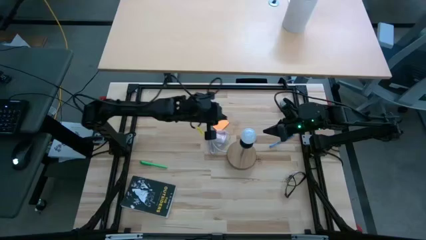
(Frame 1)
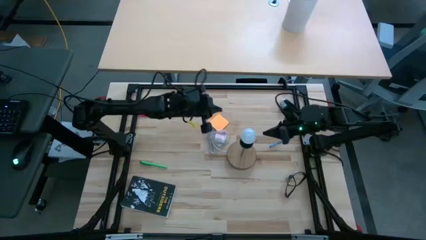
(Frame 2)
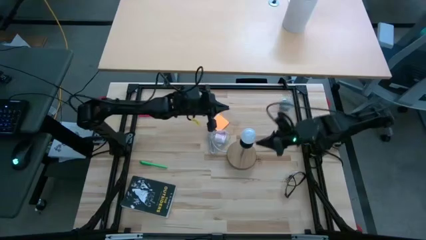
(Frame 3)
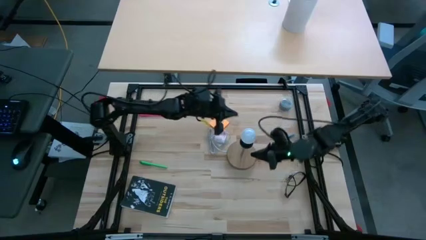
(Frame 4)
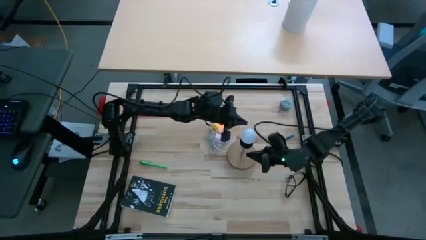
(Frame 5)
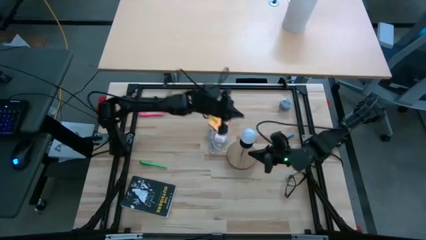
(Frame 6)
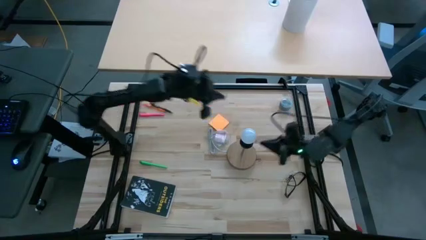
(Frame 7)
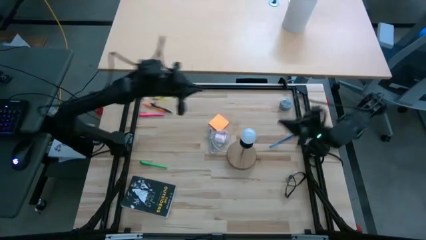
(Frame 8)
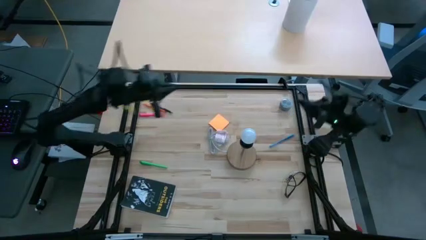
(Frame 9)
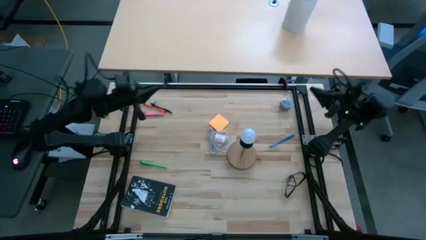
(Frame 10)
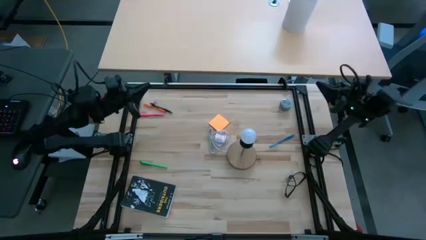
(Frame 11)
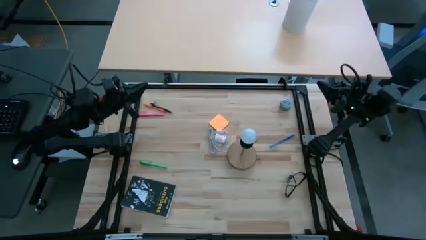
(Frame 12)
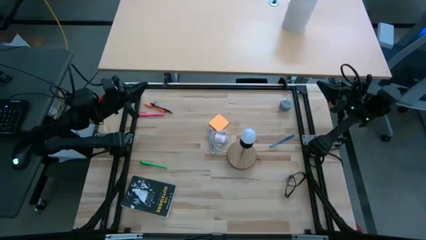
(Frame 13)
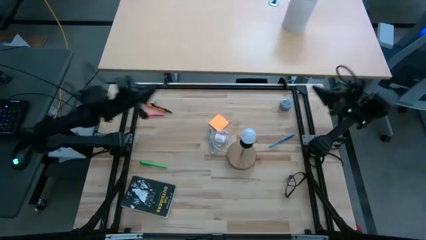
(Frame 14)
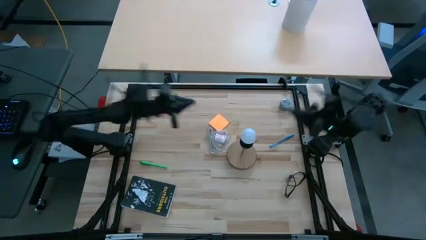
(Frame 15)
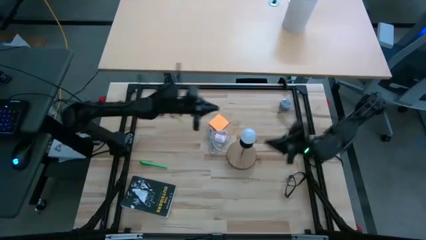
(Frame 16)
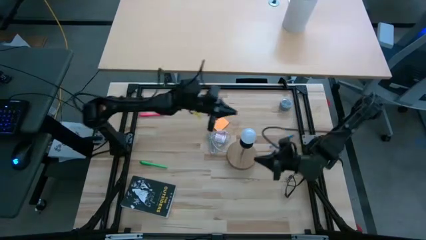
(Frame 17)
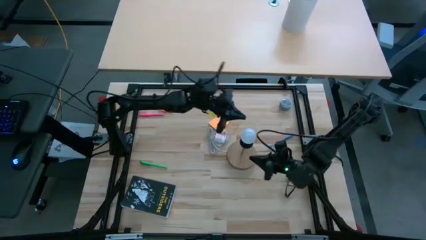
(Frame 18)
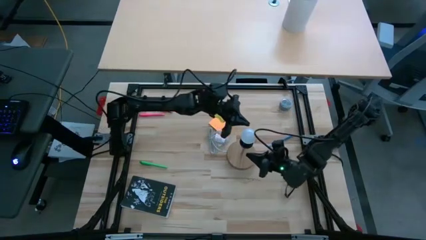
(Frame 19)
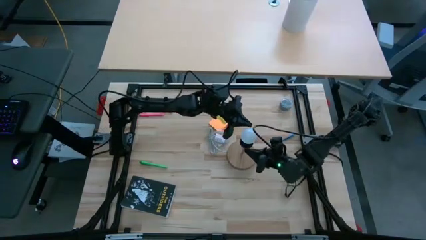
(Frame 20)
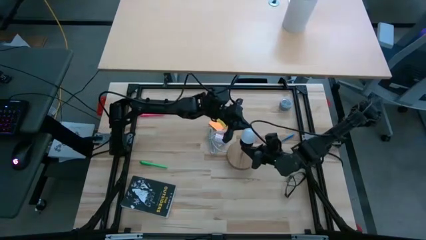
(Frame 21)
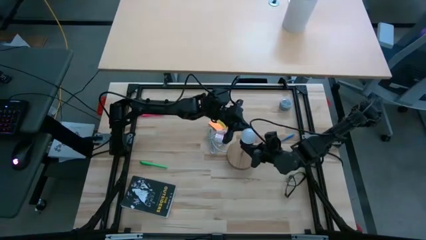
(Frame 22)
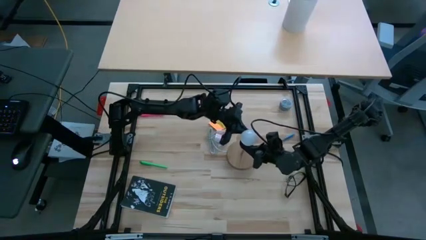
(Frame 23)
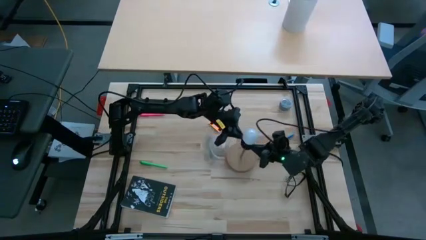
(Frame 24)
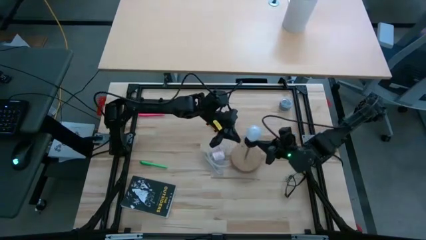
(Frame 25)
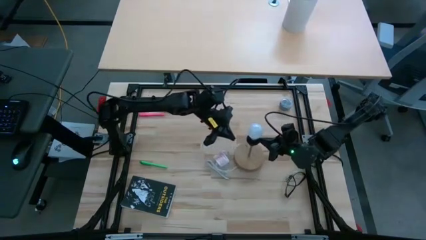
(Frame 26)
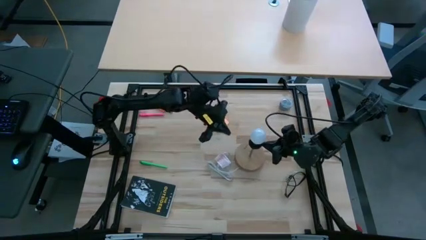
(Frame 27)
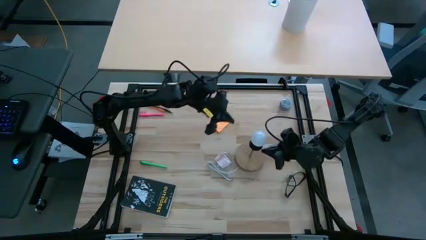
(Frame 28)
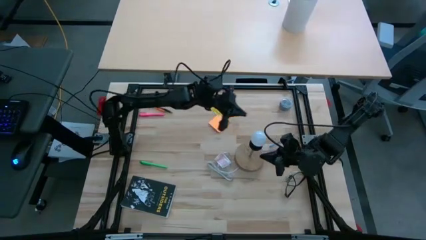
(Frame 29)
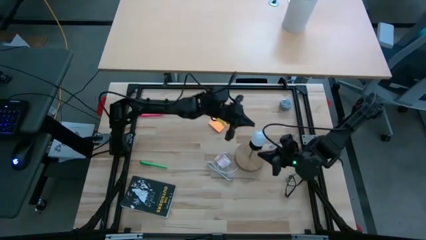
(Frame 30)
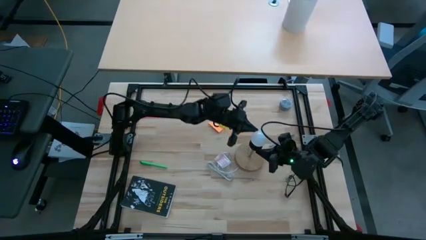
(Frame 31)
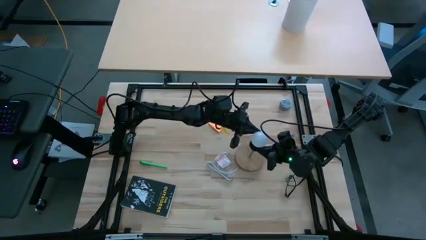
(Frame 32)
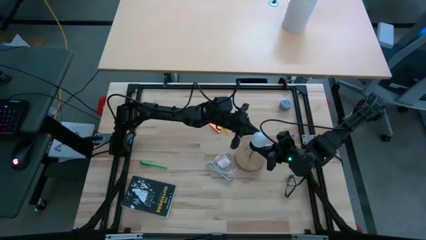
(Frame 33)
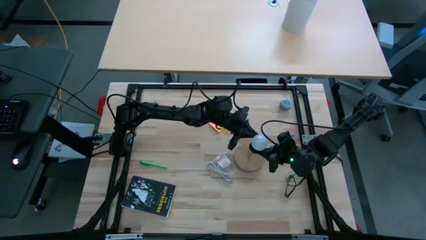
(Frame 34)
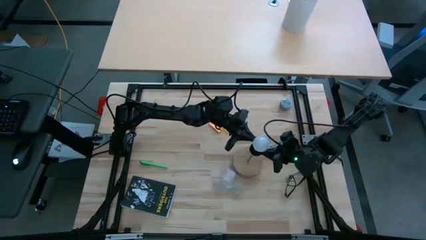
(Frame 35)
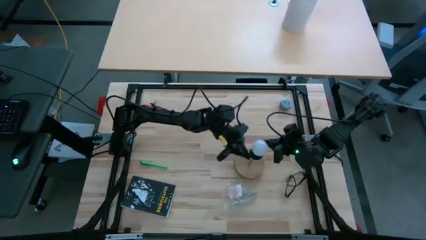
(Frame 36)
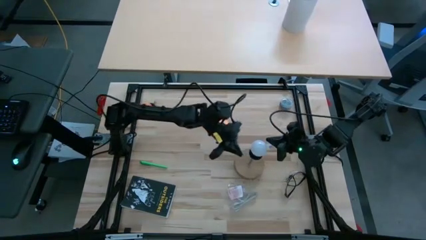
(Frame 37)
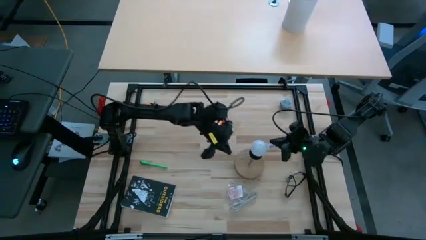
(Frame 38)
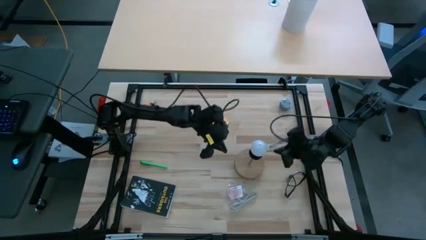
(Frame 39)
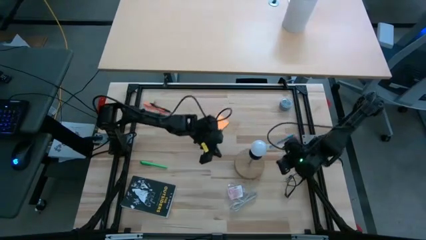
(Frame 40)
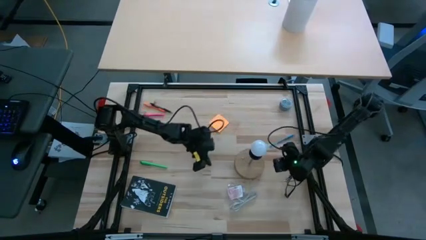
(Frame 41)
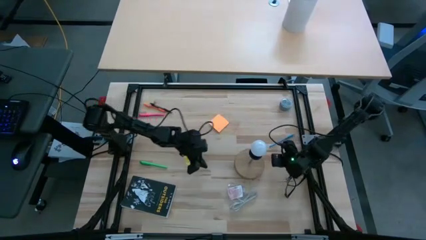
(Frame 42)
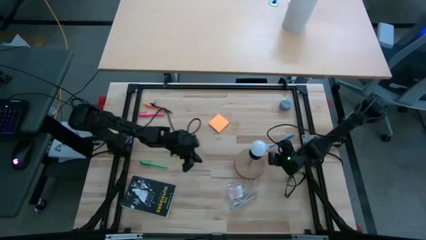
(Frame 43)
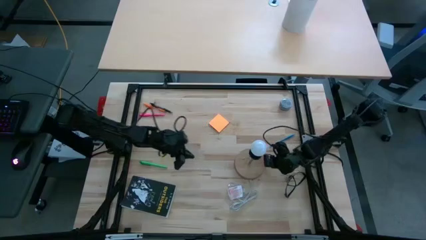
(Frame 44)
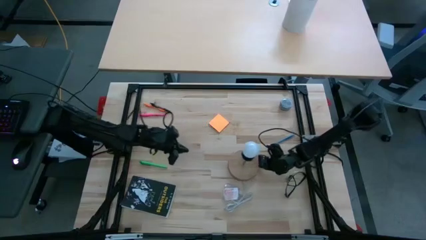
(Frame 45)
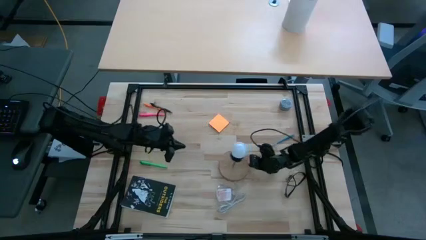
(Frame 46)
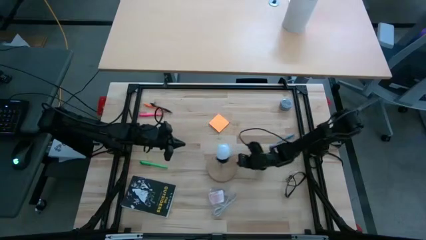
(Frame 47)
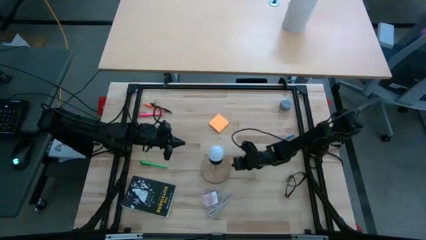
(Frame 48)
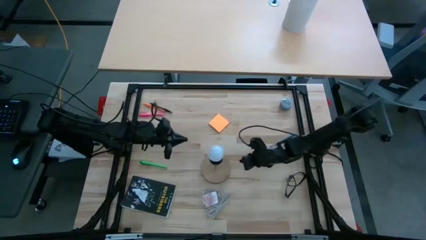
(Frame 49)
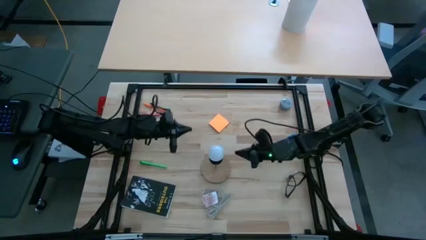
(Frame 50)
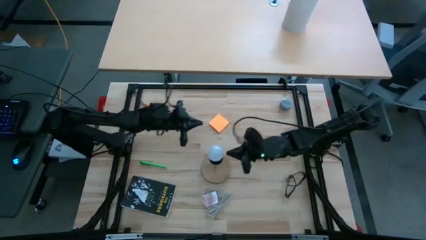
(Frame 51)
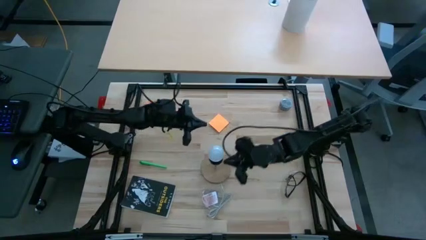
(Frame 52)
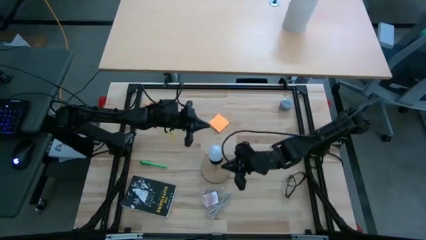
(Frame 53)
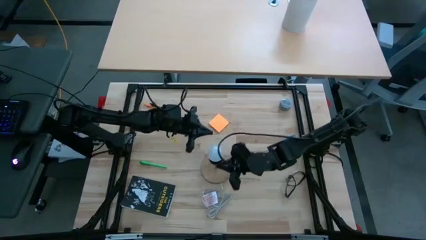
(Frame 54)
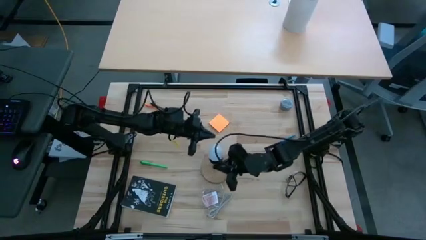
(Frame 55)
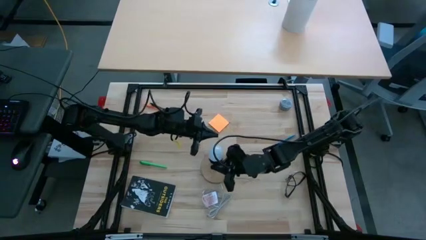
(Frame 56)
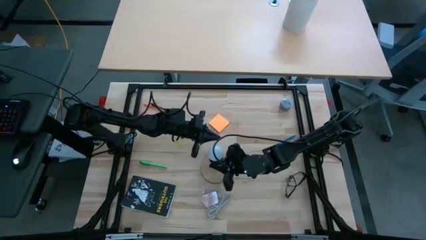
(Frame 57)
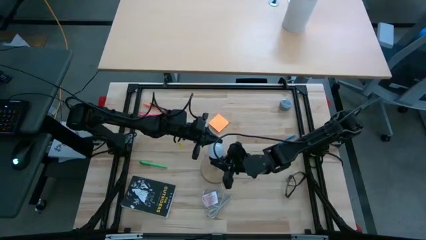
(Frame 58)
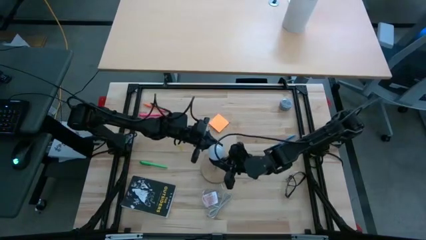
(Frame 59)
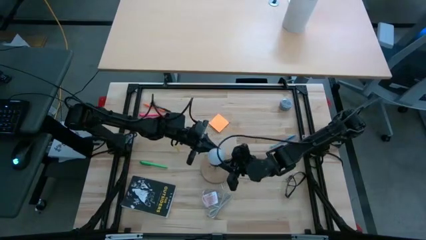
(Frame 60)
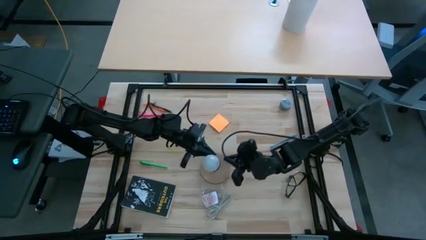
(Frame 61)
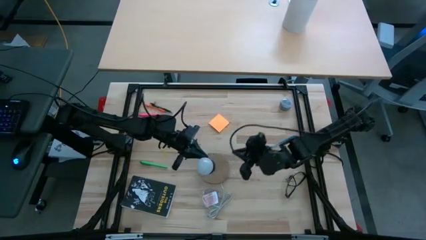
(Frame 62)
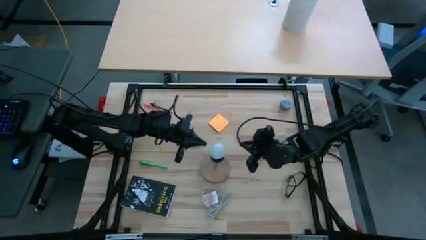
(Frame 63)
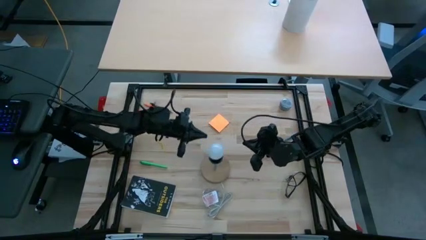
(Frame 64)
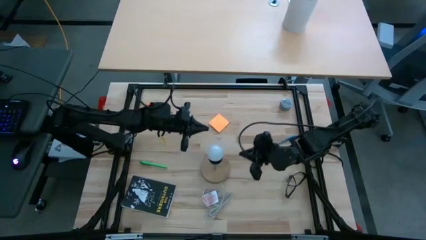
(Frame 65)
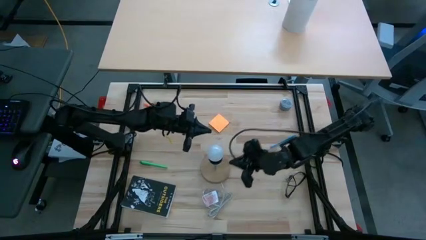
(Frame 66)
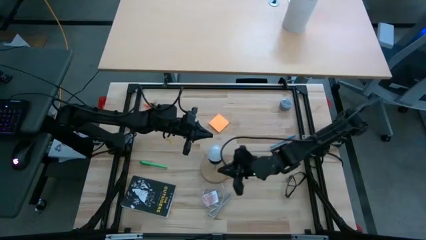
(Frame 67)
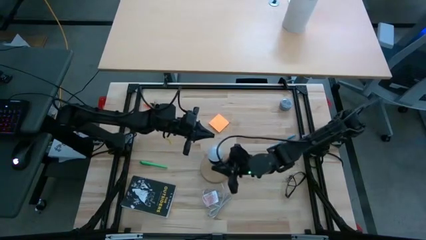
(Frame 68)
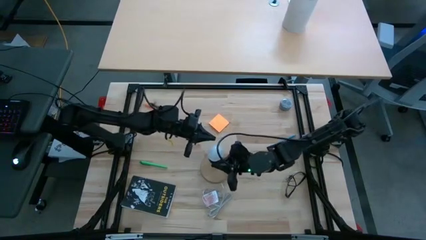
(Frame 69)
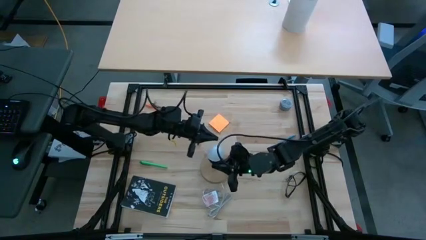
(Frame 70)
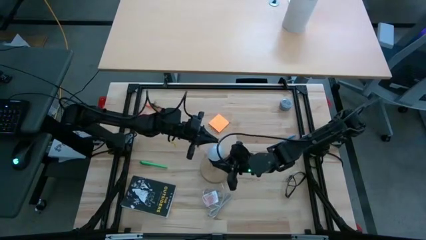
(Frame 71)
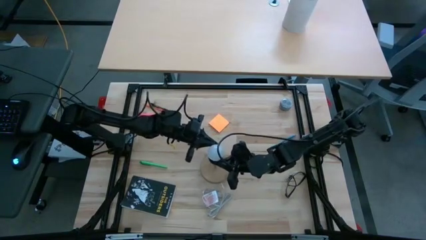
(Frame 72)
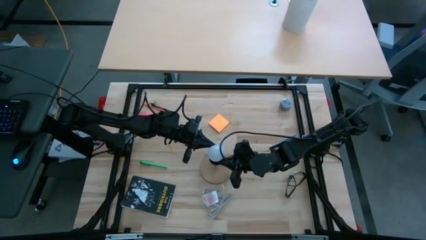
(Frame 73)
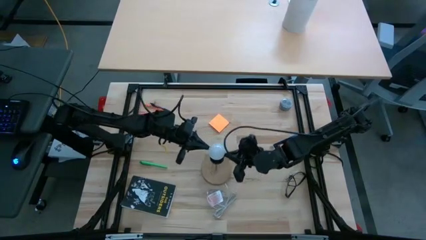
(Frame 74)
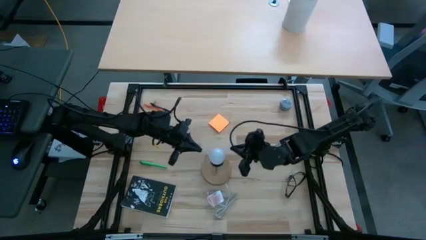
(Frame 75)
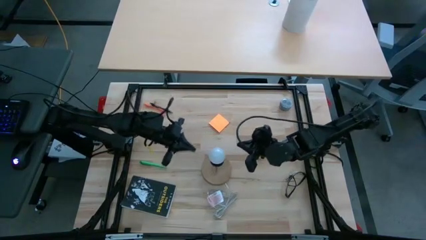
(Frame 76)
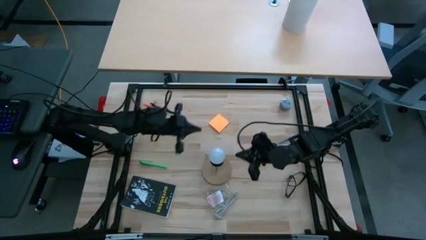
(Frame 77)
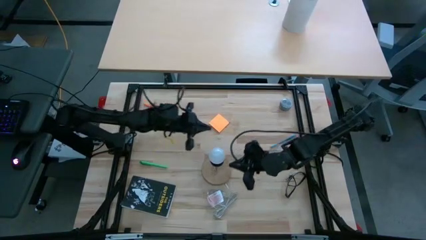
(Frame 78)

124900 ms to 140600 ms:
Task: Screw lightbulb
Remove the white lightbulb from the lamp
